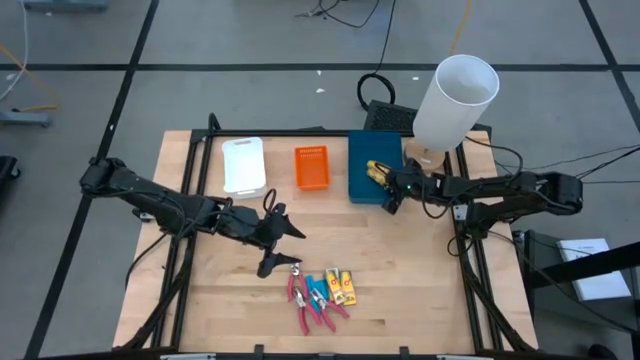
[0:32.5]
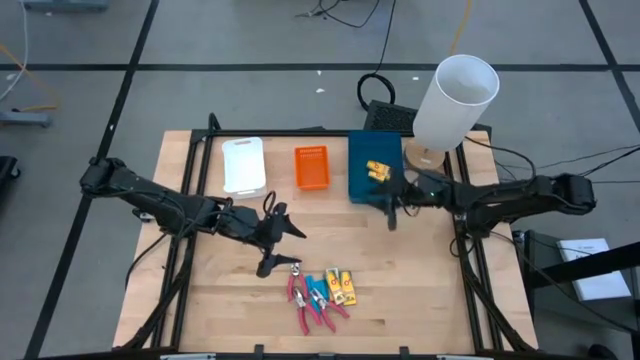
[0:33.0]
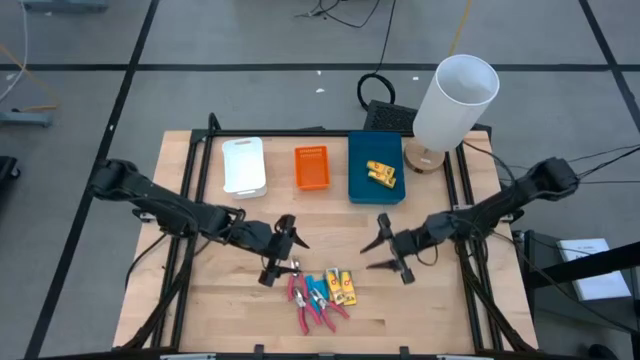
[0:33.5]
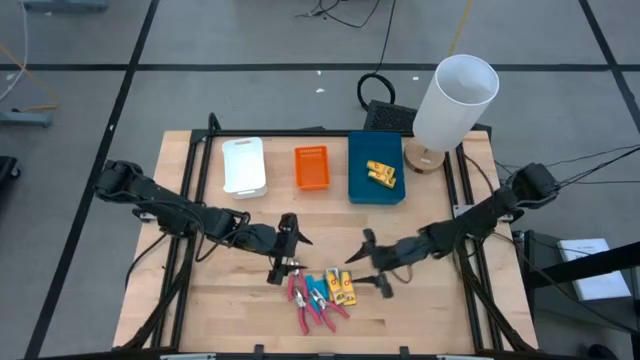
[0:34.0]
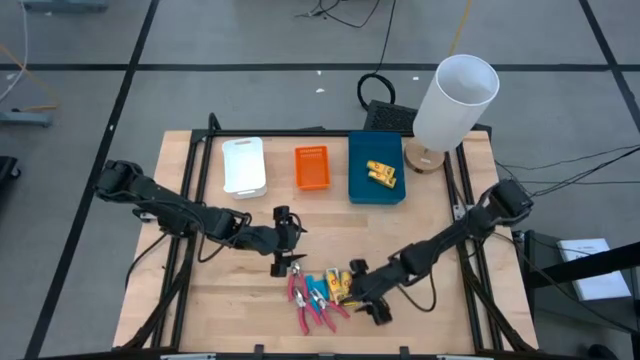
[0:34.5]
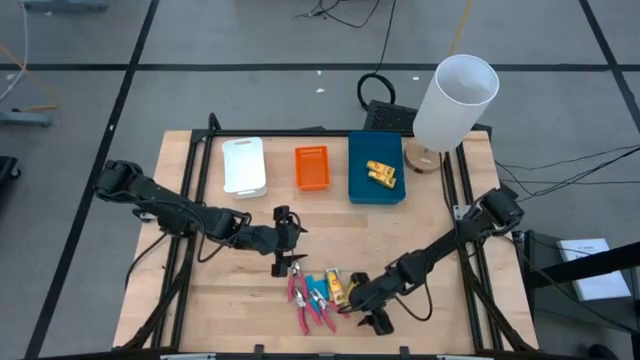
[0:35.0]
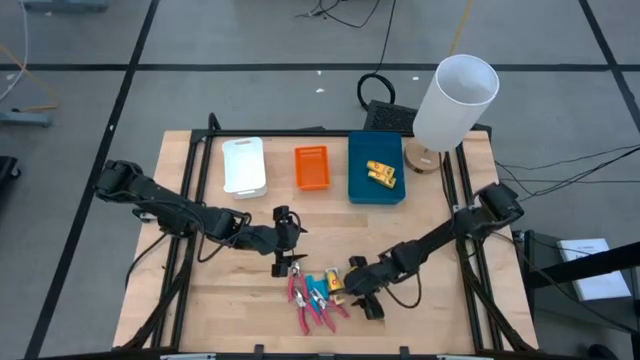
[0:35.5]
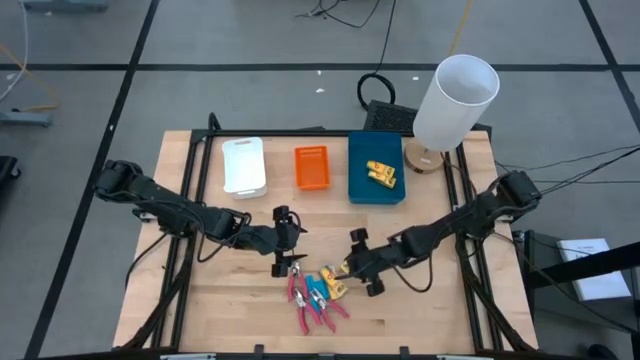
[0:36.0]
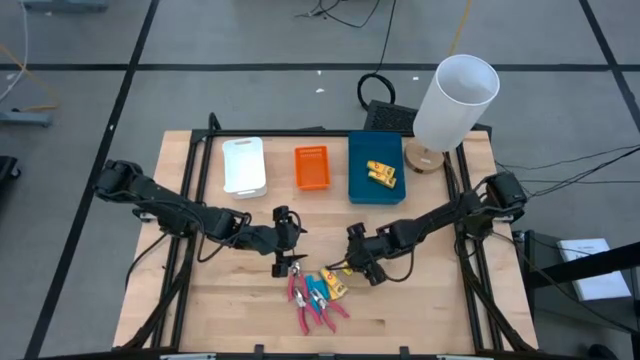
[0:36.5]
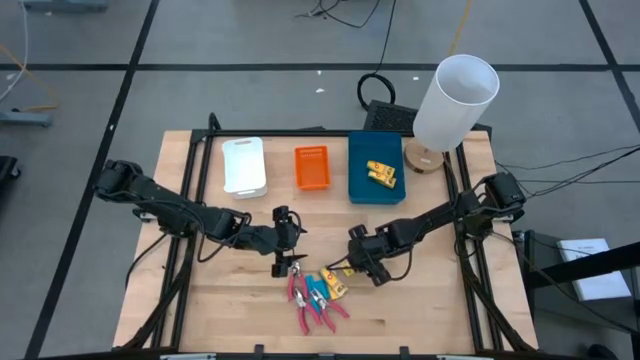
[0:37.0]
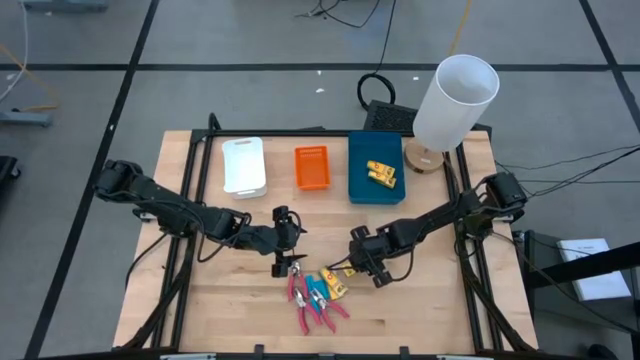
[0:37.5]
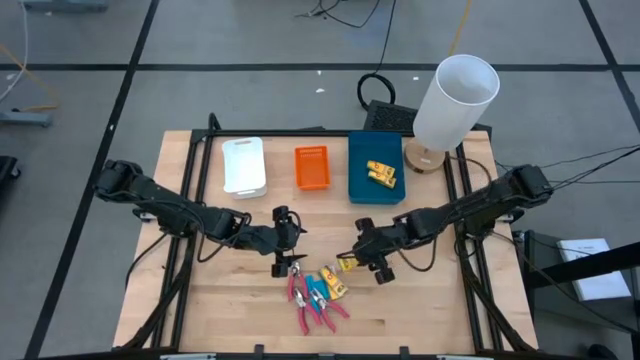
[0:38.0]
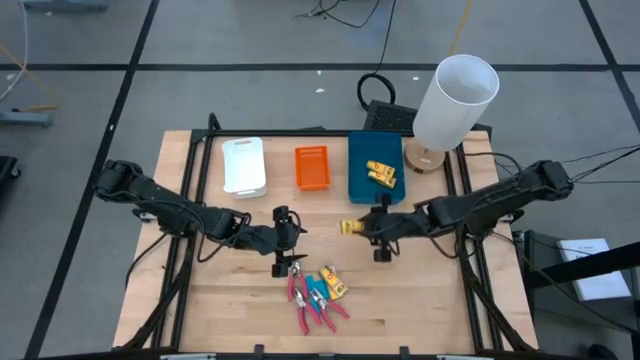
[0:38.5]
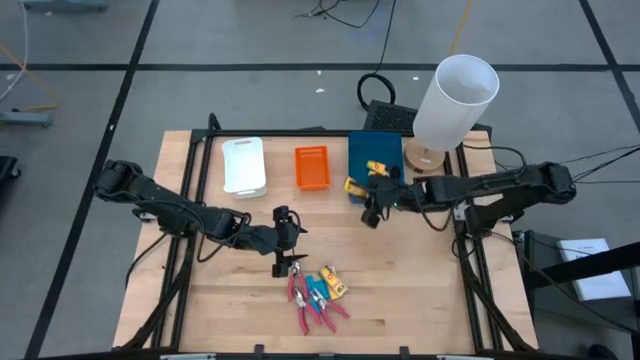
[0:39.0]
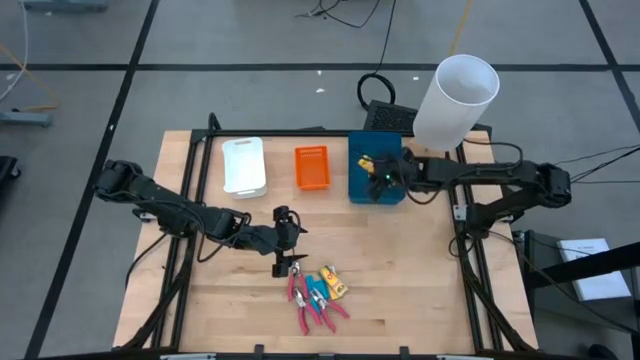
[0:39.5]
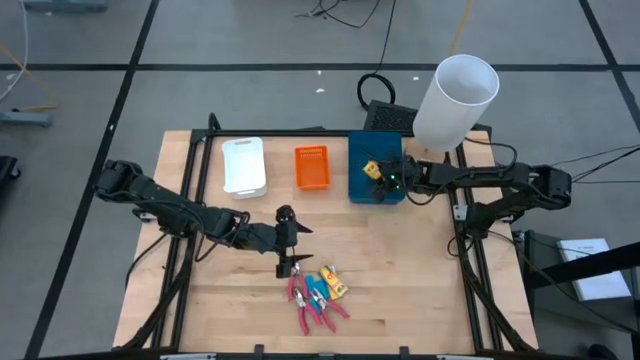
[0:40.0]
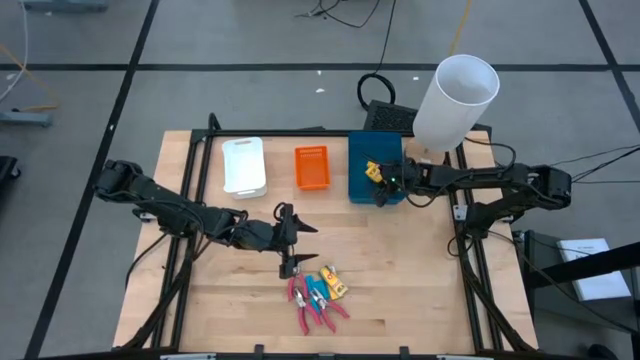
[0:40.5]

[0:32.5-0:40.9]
Task: Pick & Place School Supplies
Put the crayon box into the blue bin

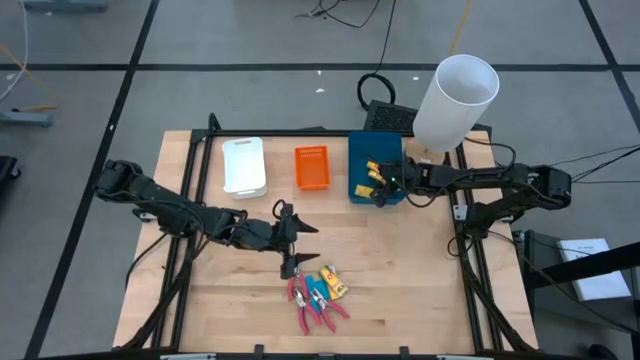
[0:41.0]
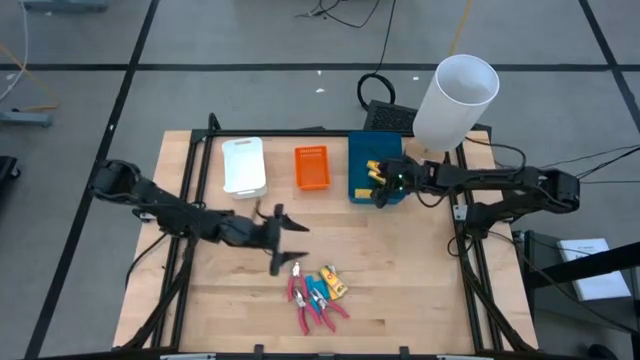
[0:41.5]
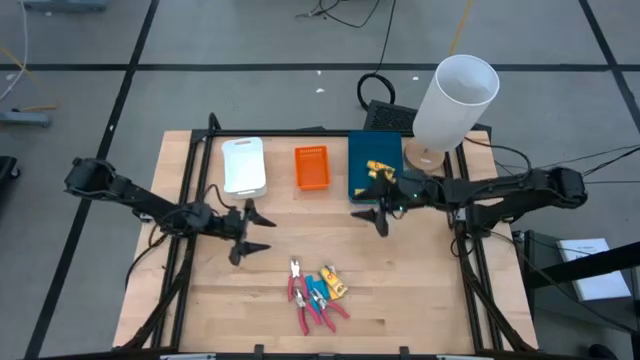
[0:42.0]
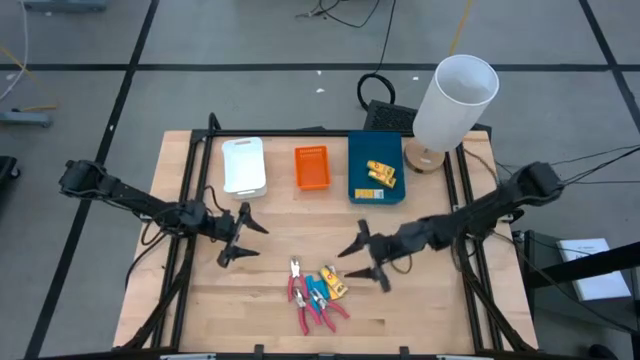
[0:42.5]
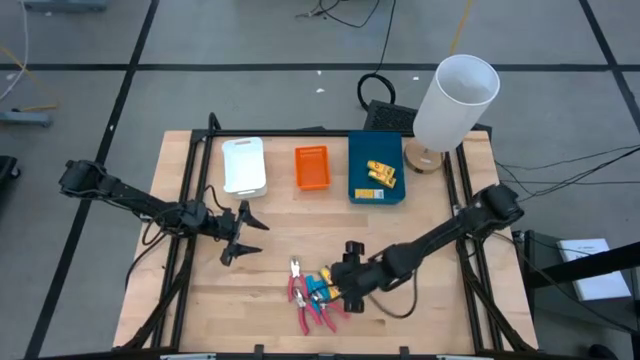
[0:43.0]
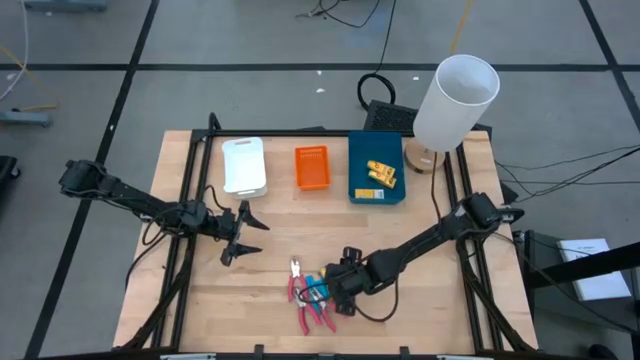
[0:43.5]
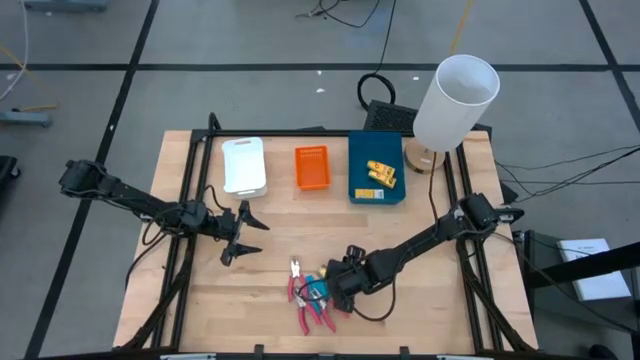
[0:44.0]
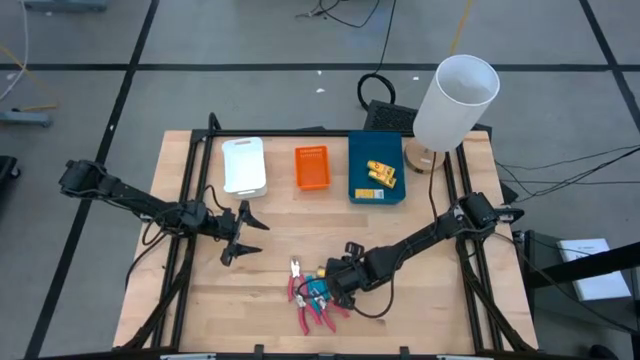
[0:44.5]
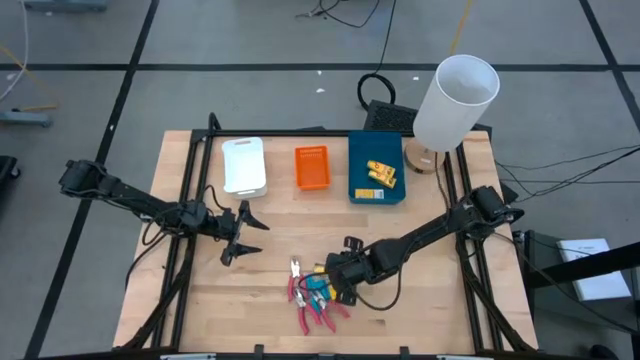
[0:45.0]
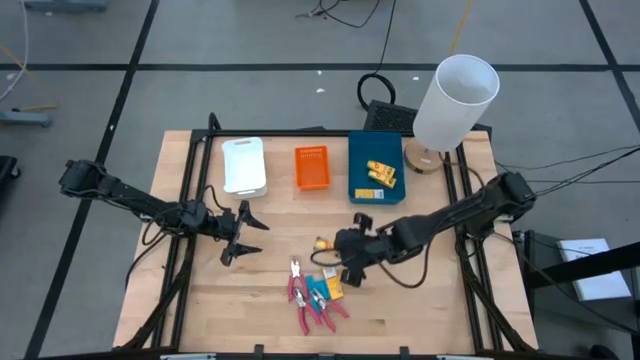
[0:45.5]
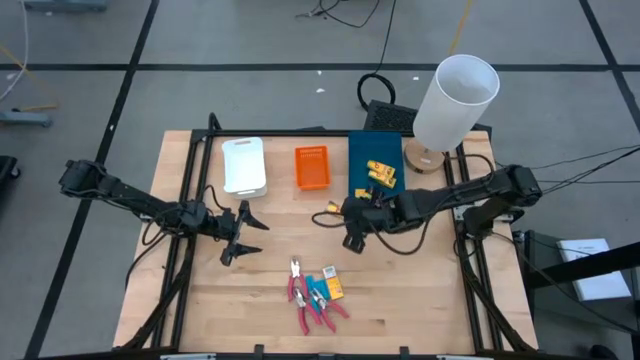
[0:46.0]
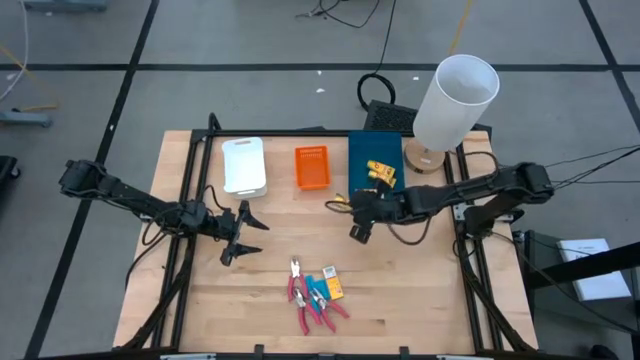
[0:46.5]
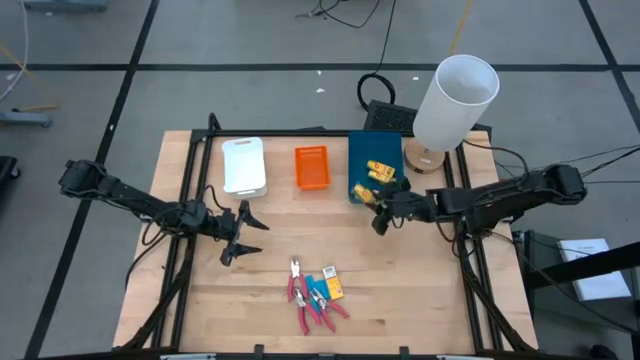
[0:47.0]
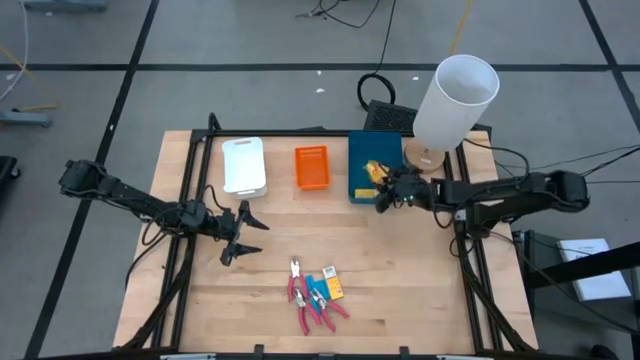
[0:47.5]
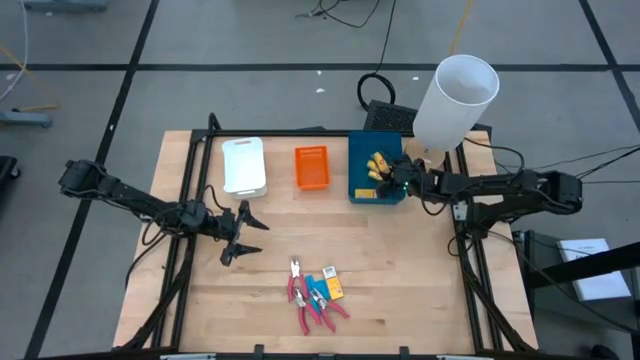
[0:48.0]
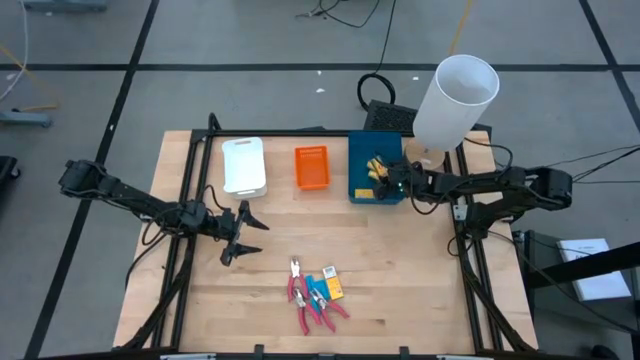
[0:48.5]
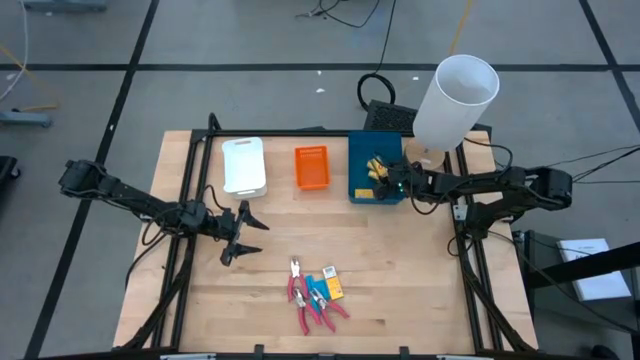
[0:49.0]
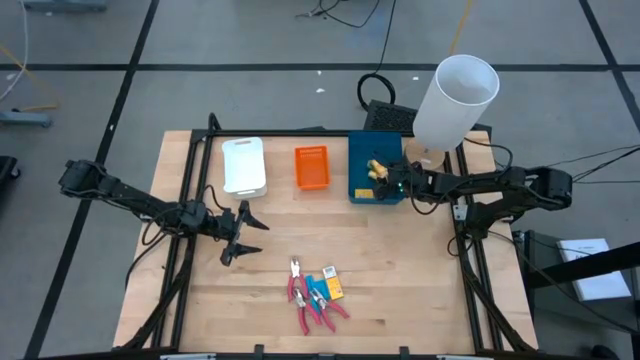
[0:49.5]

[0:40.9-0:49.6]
Put the crayon box into the blue bin

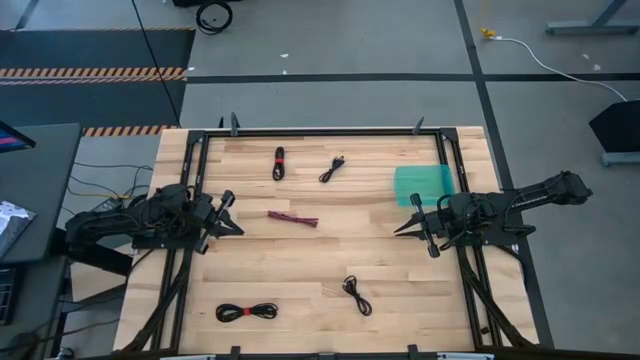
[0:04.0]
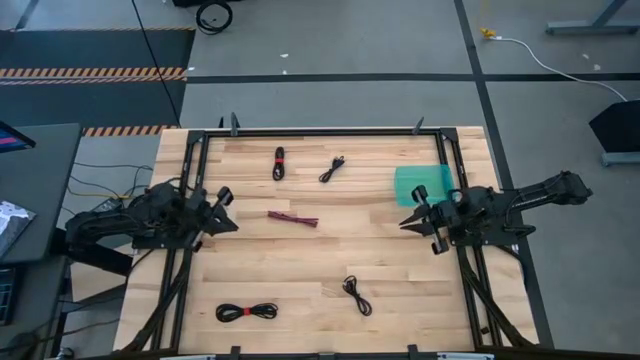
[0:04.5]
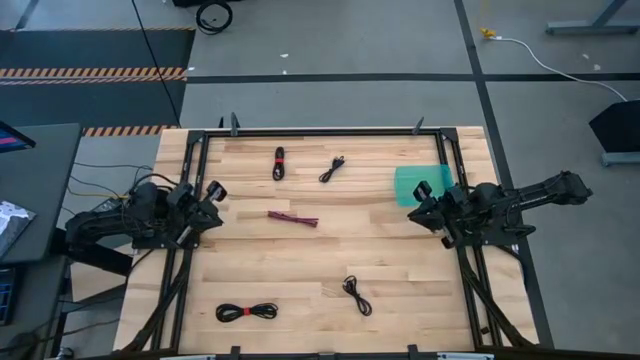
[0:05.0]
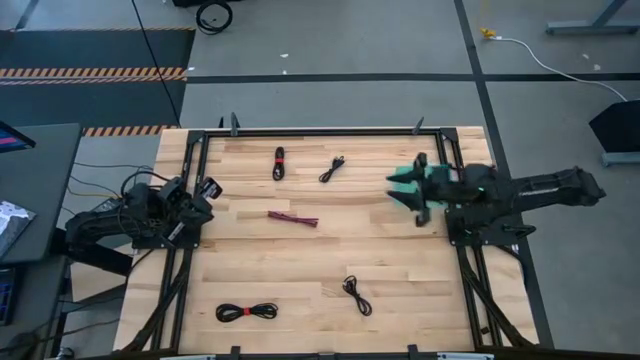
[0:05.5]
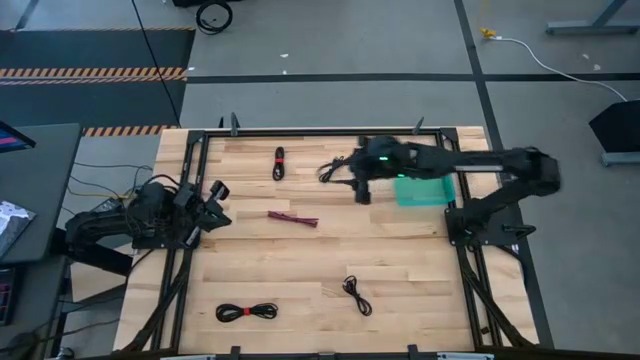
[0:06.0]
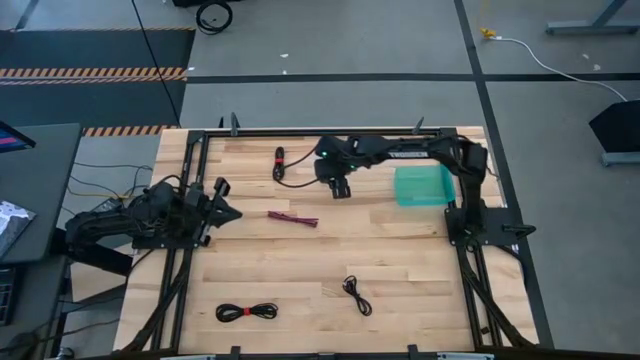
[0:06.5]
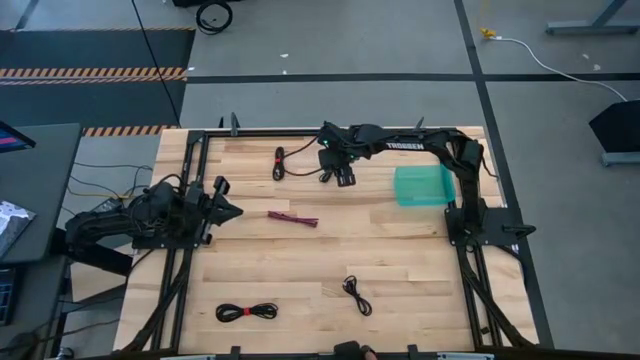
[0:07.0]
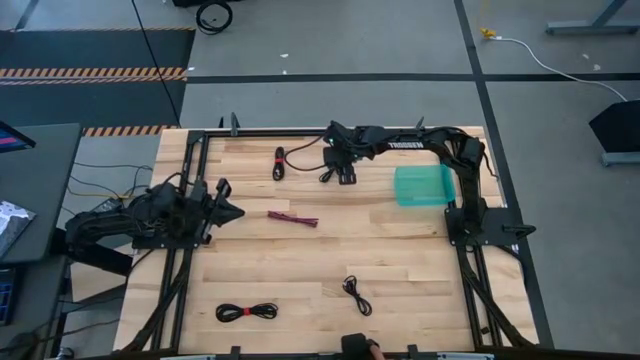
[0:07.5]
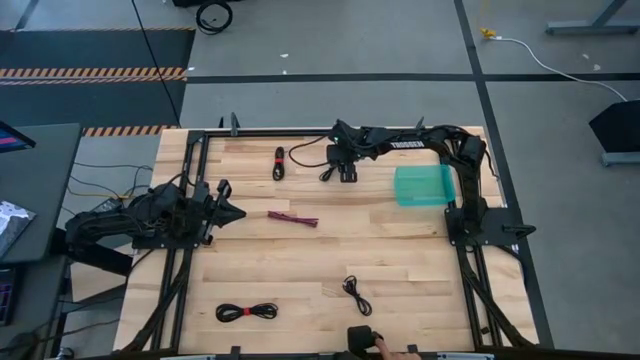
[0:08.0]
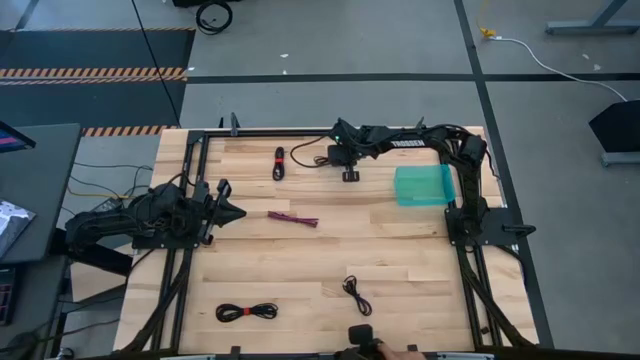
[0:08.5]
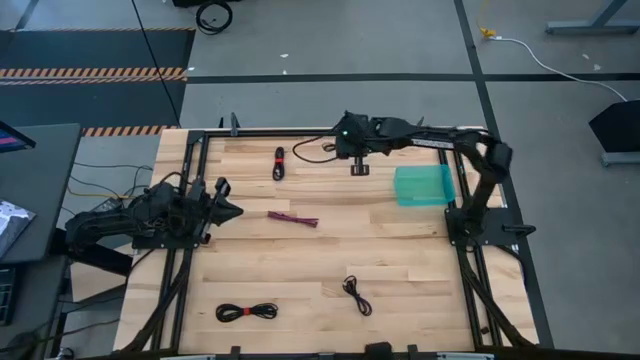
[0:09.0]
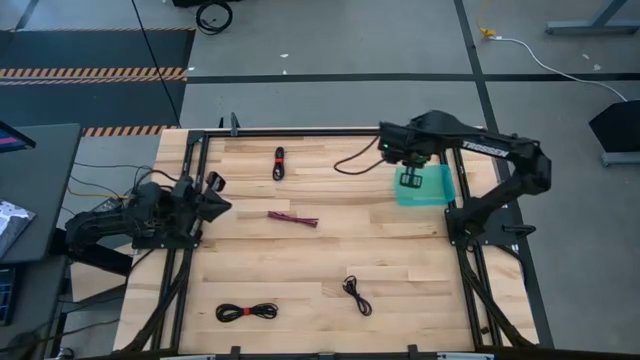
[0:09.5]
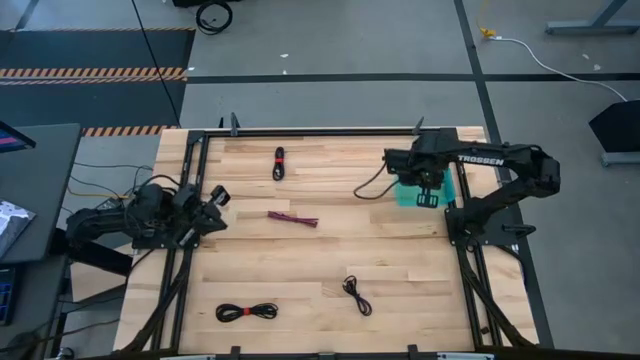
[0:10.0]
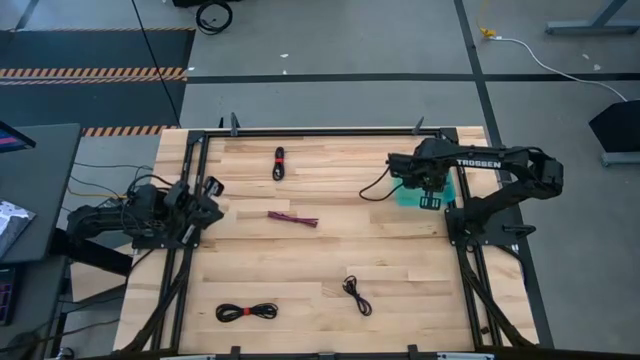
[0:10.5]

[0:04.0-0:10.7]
Task: Pick and place USB-C Cables
Put the top right black charger cable into the bin
